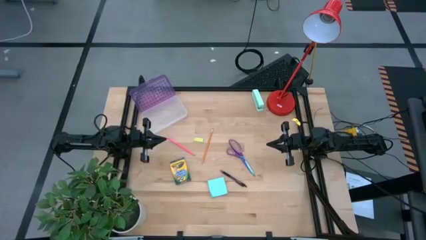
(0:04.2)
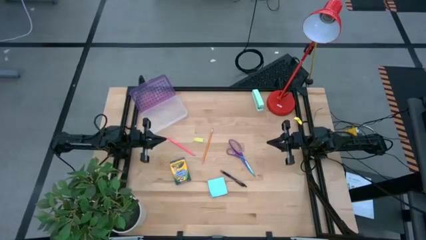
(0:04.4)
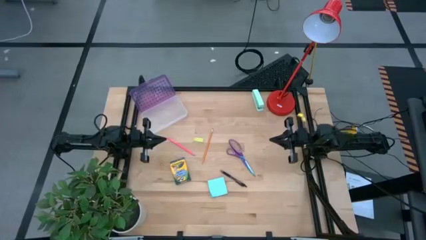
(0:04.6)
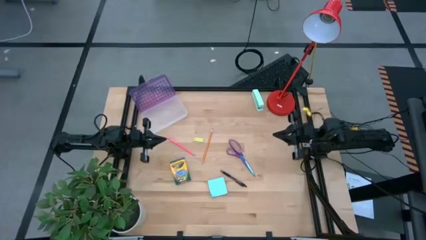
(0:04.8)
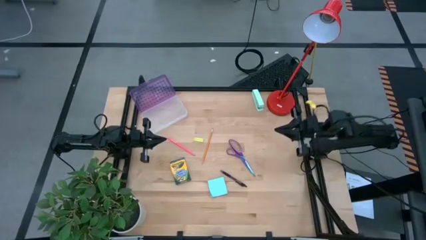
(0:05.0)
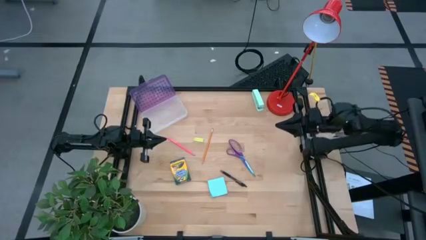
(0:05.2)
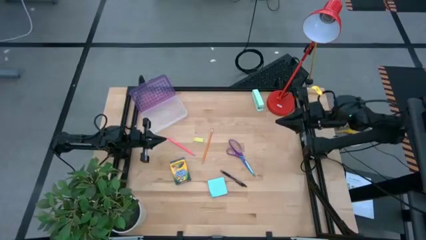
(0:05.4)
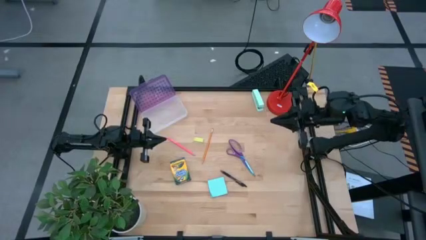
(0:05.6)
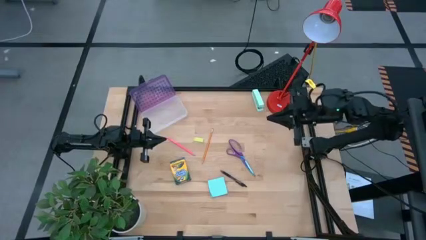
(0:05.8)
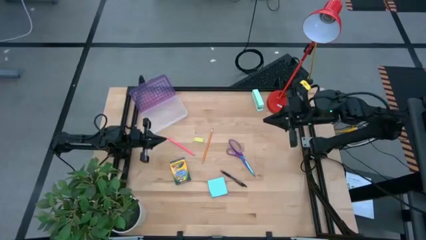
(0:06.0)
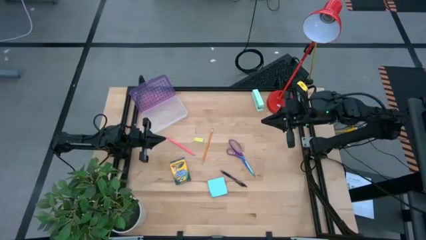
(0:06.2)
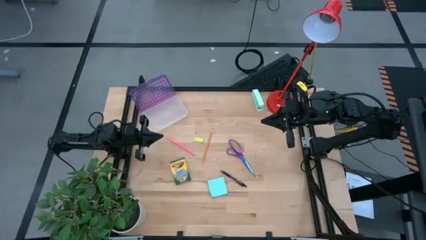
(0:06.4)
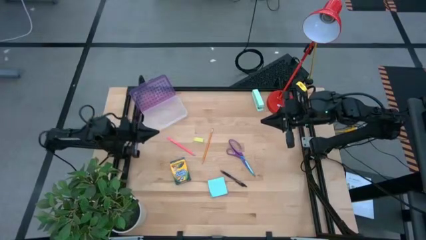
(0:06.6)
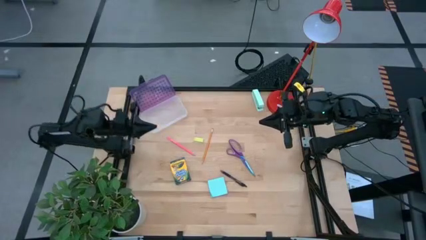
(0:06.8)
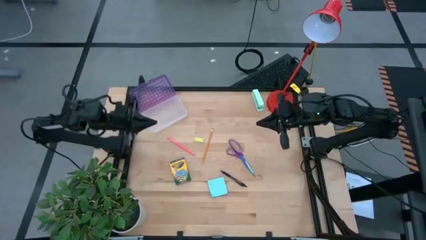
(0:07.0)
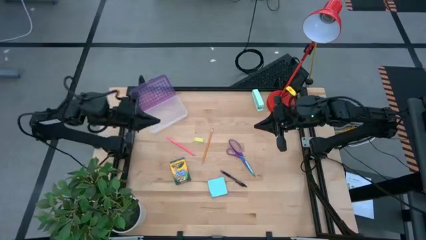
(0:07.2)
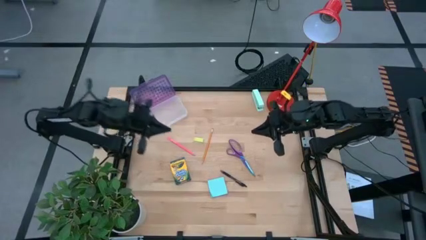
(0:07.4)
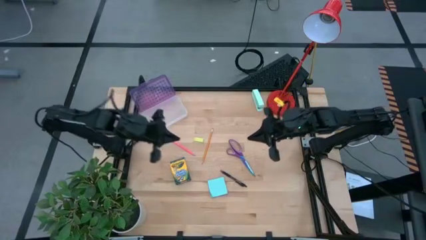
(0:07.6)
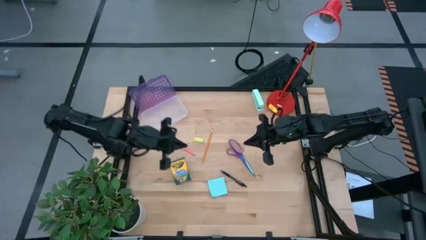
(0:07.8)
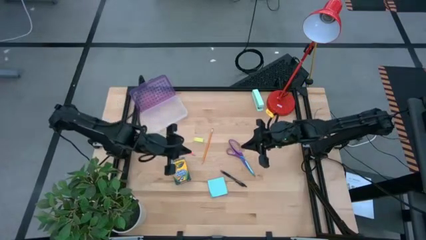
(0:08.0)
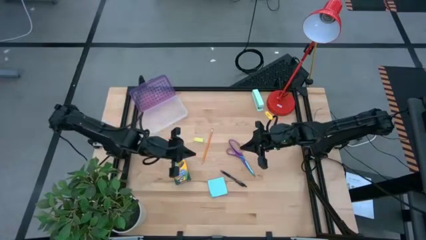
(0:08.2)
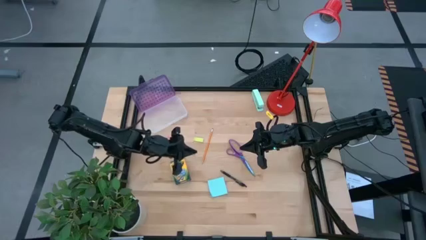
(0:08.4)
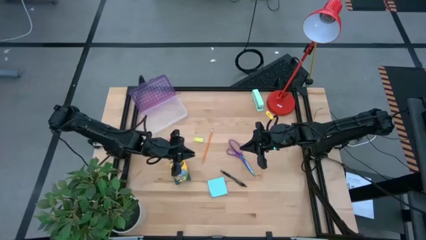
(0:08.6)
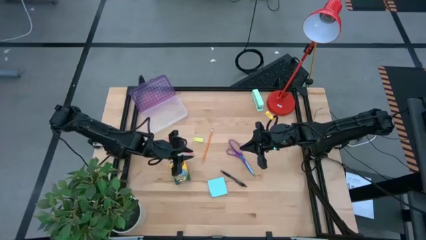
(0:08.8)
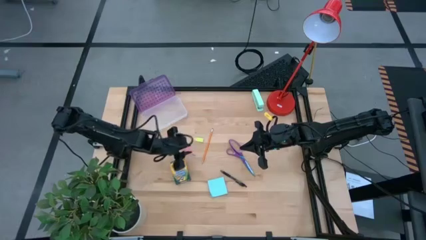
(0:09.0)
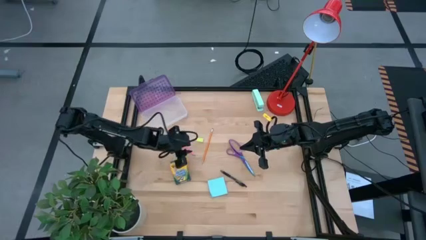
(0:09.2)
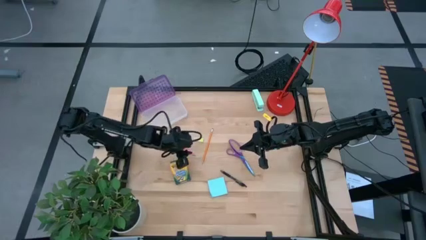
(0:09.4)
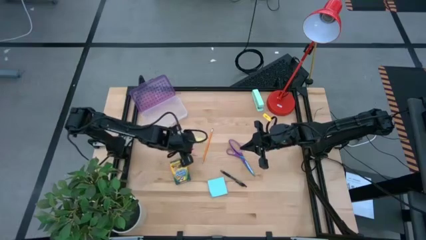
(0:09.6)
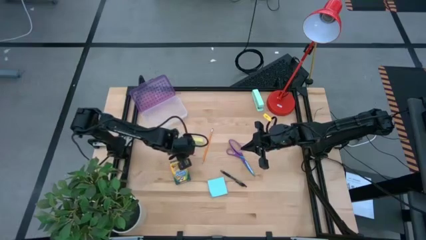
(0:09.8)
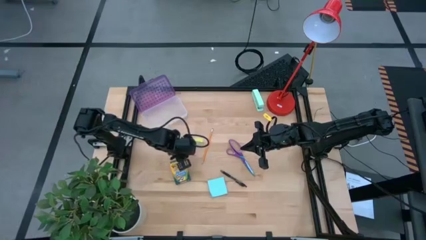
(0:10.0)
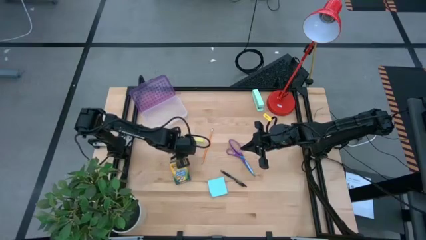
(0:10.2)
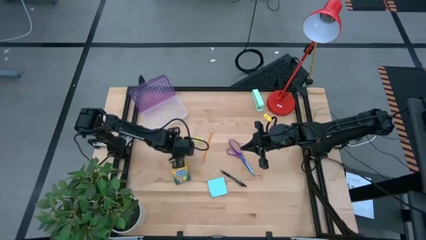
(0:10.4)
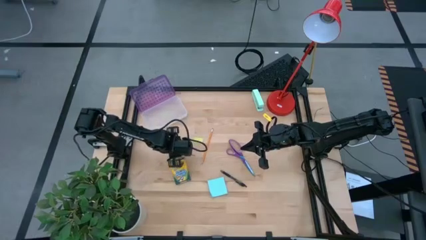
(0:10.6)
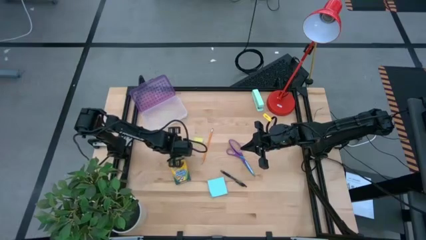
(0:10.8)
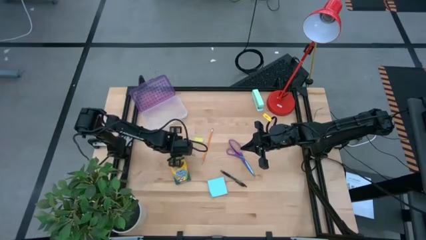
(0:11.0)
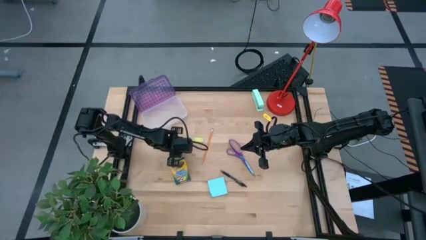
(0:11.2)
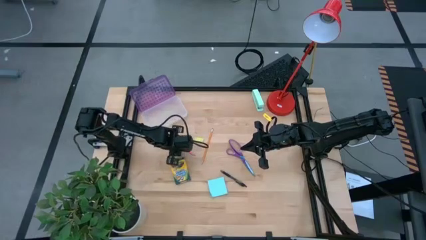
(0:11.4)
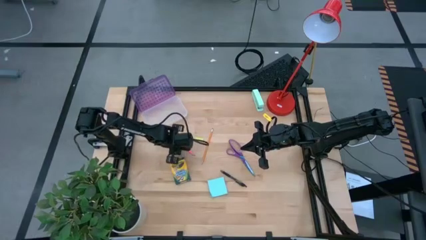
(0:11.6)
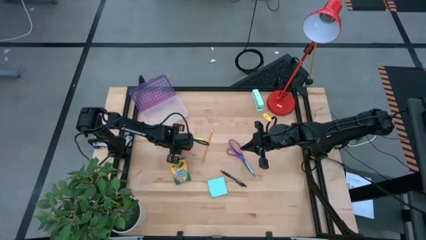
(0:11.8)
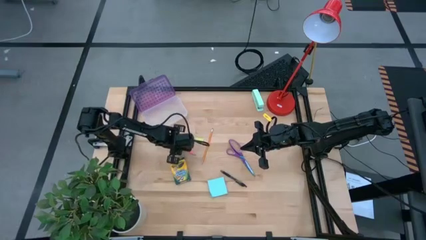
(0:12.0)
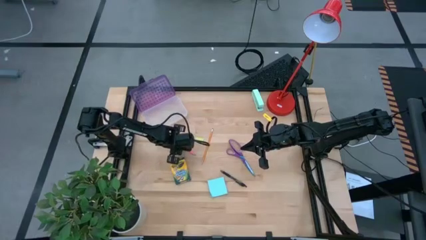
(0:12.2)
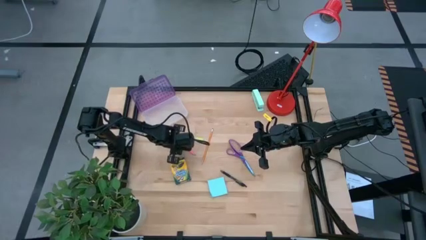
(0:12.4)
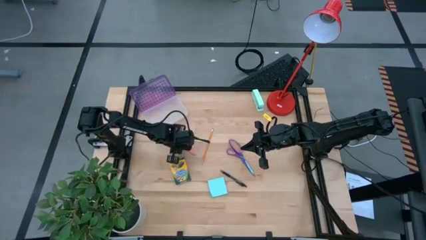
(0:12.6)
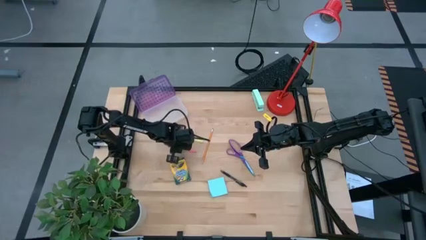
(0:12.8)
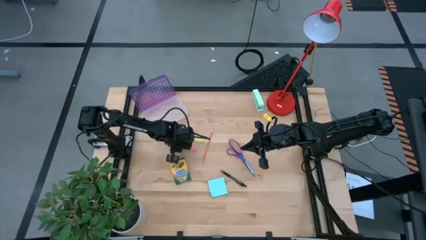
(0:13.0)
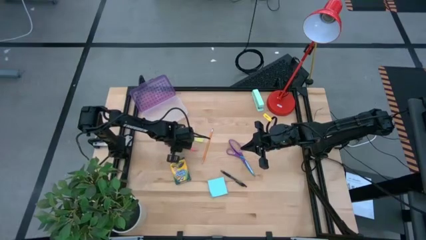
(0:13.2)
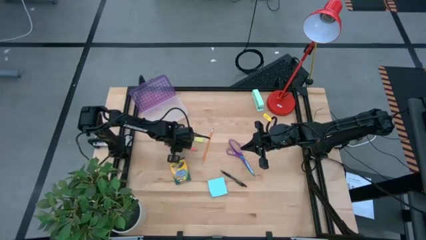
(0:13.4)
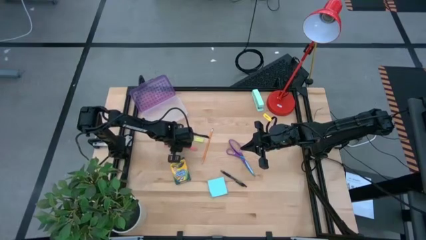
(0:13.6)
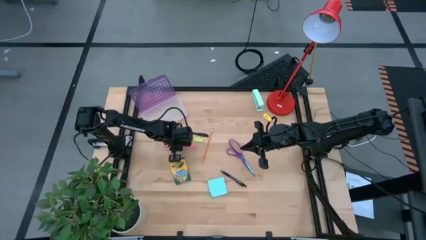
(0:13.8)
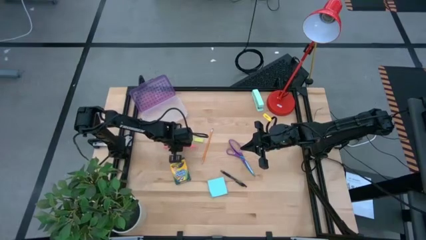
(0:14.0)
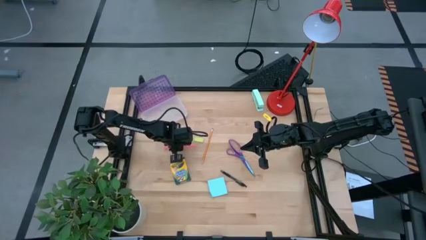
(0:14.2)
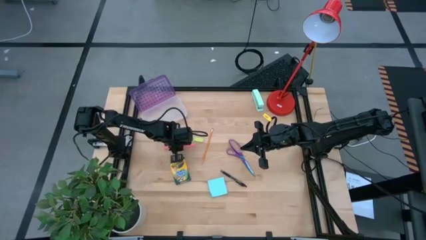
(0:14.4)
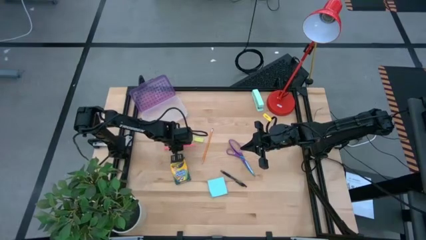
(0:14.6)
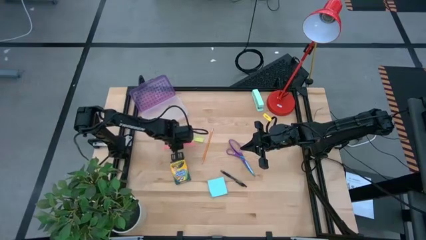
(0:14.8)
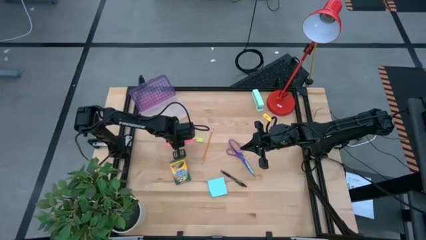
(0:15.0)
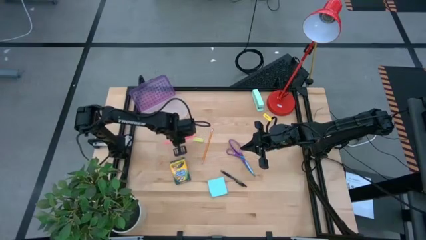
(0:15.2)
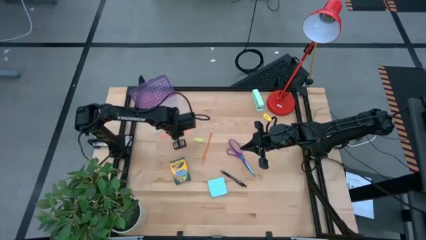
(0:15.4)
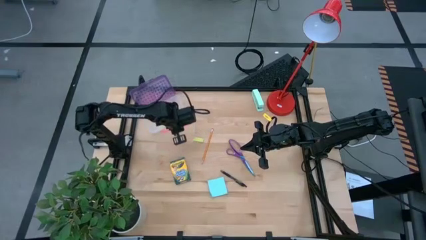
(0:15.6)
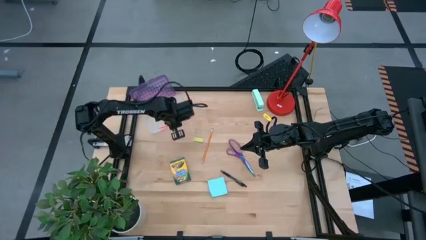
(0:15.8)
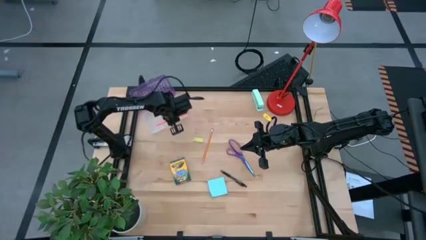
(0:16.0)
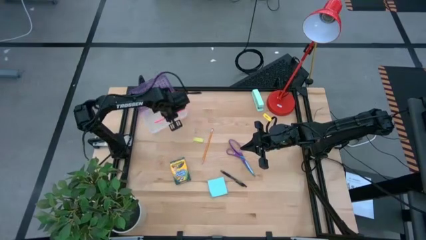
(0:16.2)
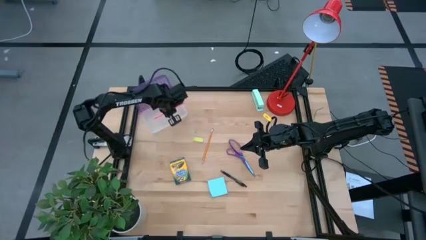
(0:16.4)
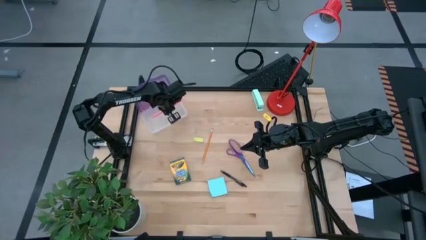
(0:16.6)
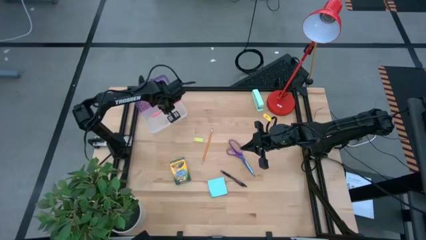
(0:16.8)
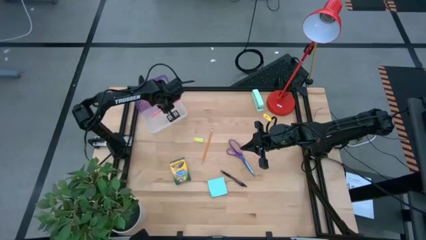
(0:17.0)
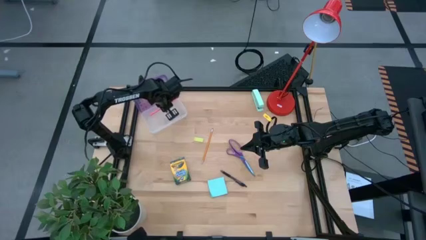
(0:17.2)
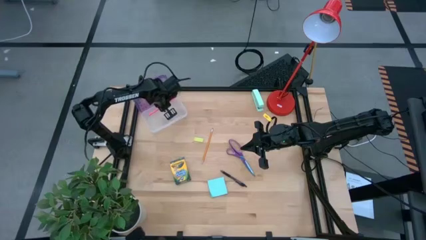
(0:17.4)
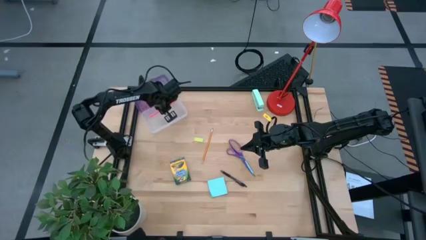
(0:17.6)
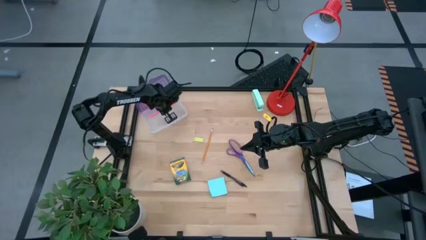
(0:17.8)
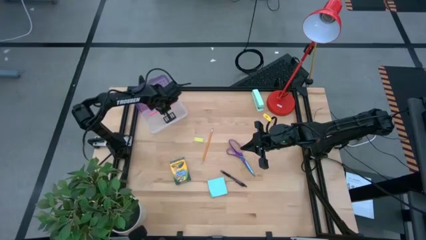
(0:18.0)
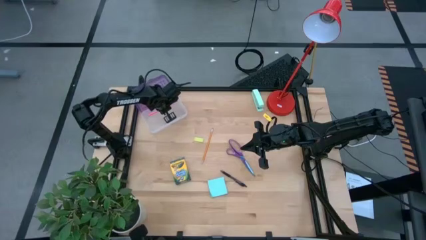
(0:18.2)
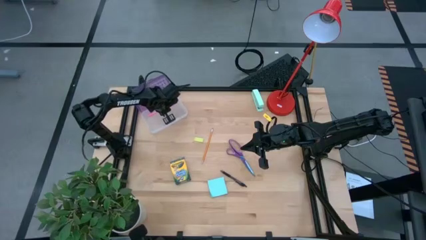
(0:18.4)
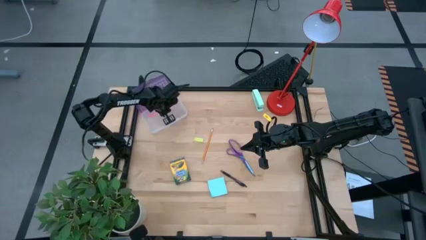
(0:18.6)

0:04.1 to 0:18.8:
Task: Pack school essentials
Put the pink pencil into the purple supply box
